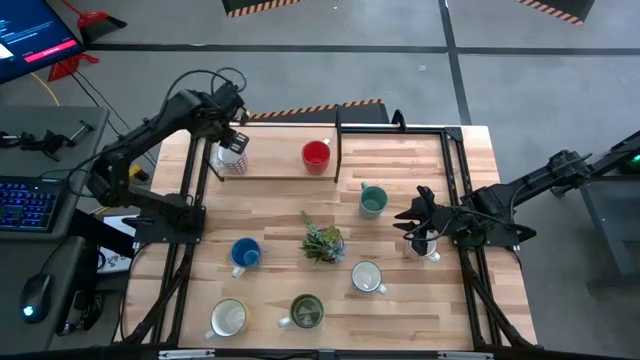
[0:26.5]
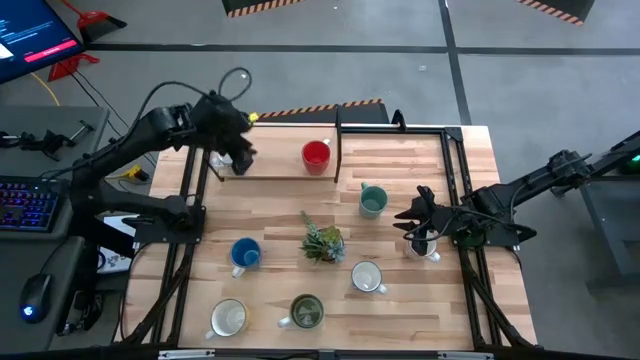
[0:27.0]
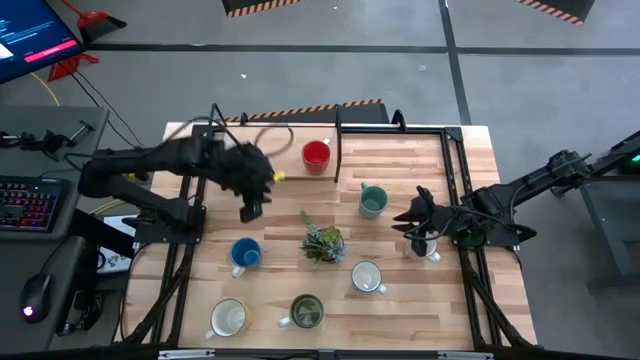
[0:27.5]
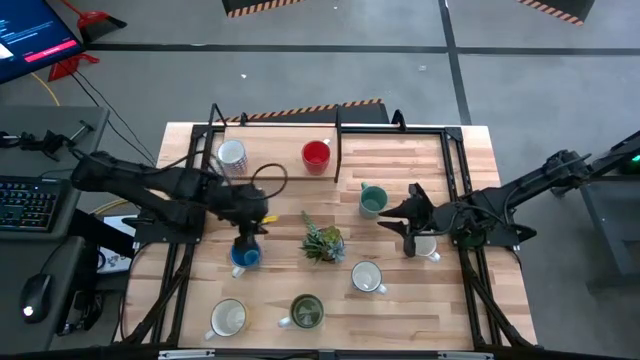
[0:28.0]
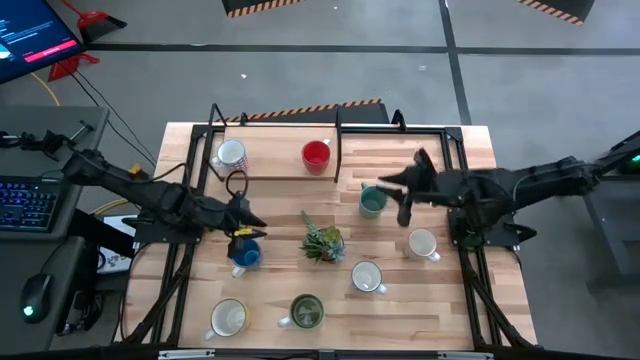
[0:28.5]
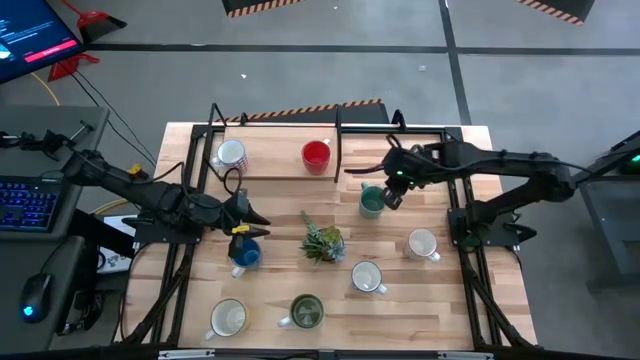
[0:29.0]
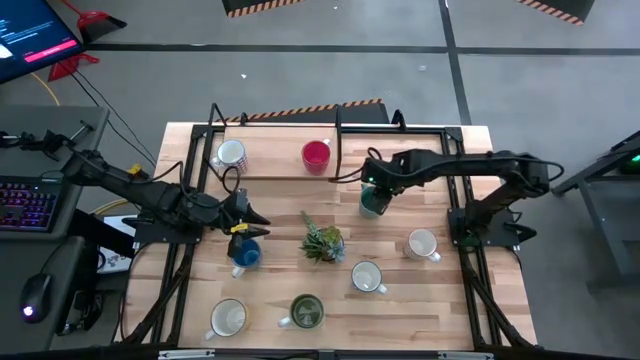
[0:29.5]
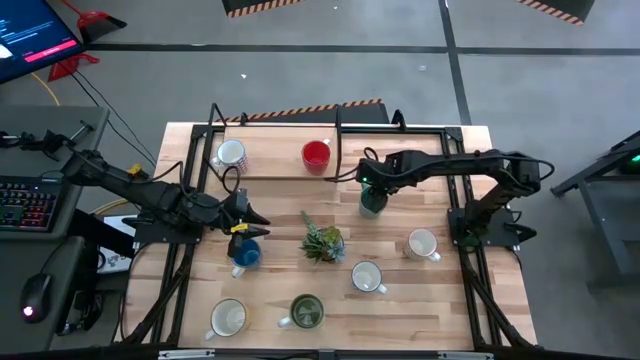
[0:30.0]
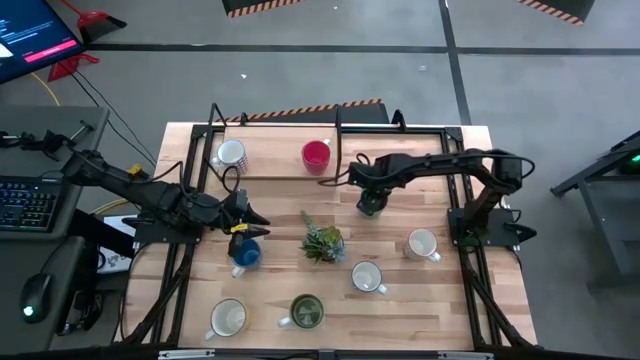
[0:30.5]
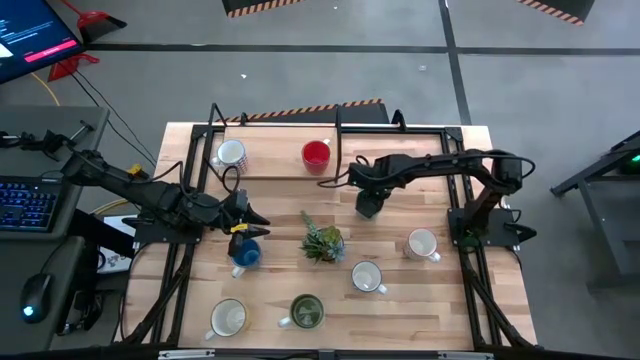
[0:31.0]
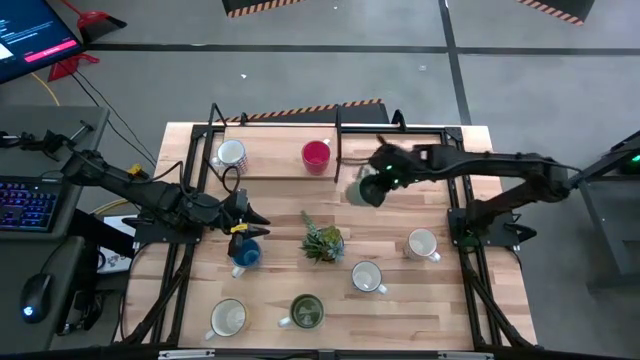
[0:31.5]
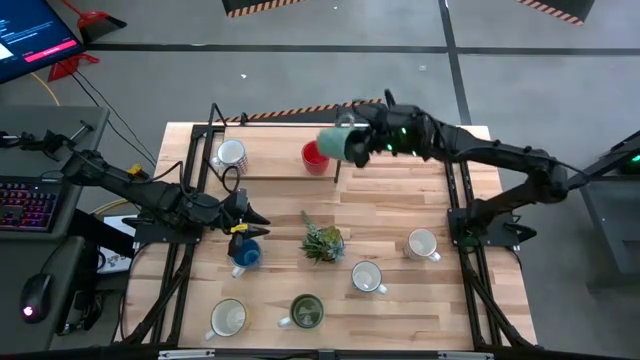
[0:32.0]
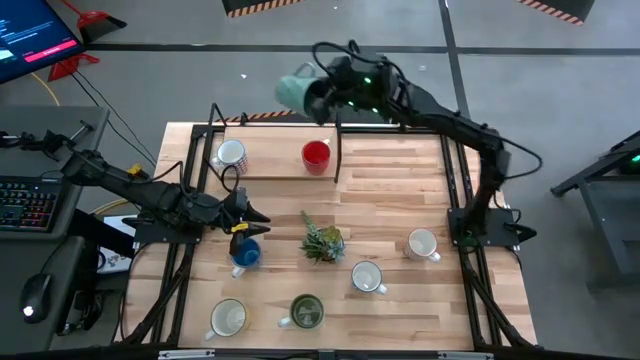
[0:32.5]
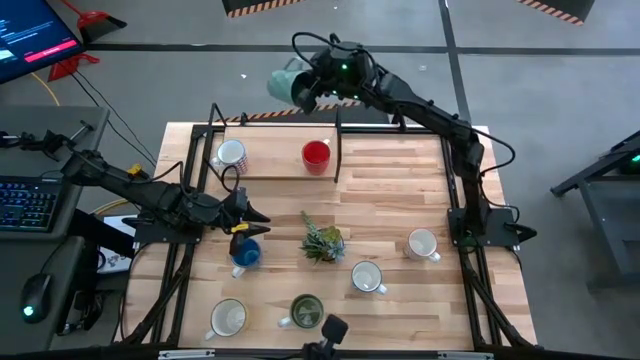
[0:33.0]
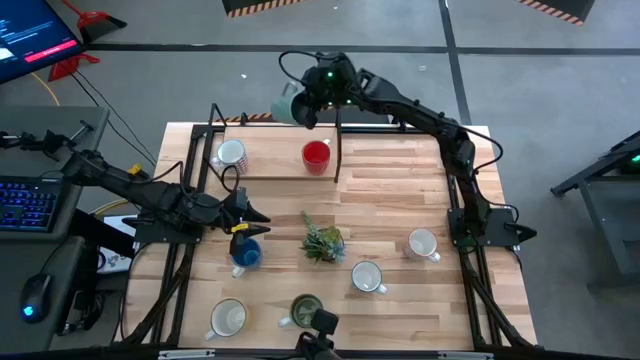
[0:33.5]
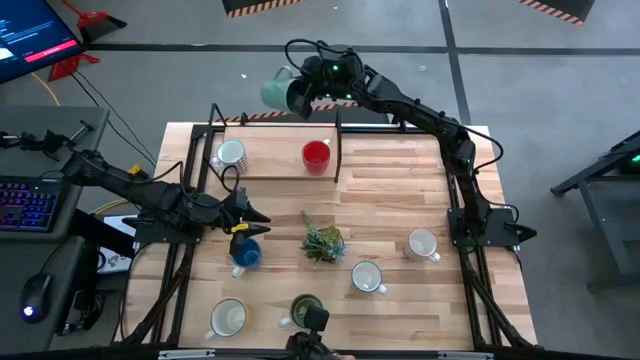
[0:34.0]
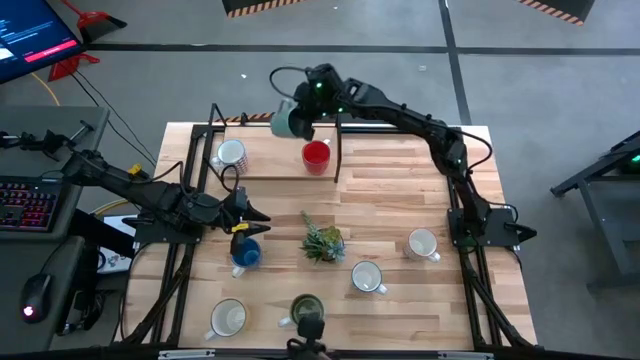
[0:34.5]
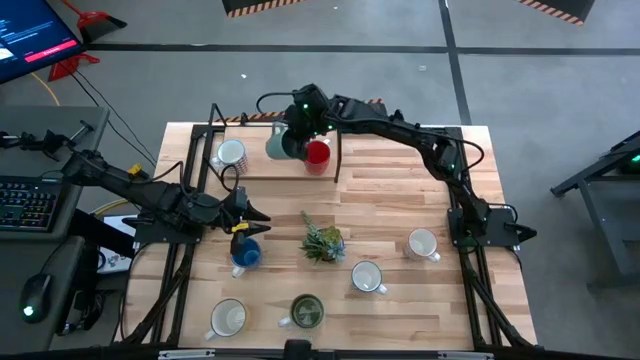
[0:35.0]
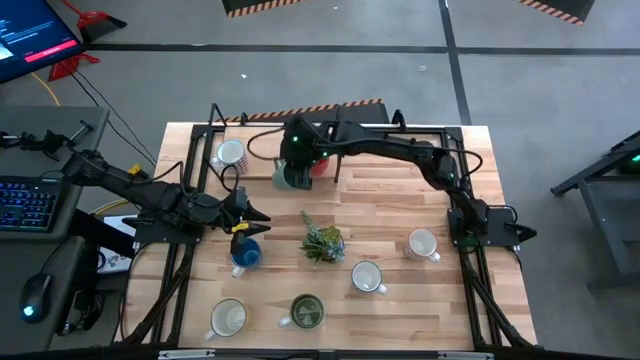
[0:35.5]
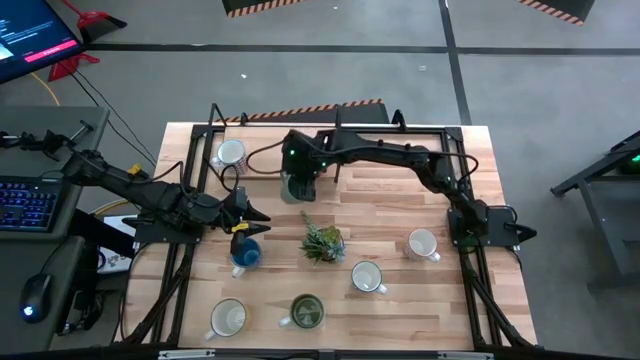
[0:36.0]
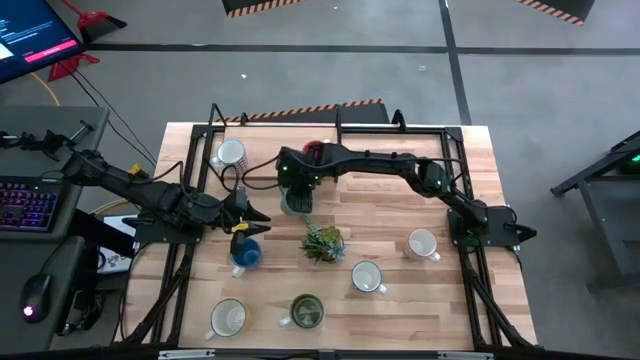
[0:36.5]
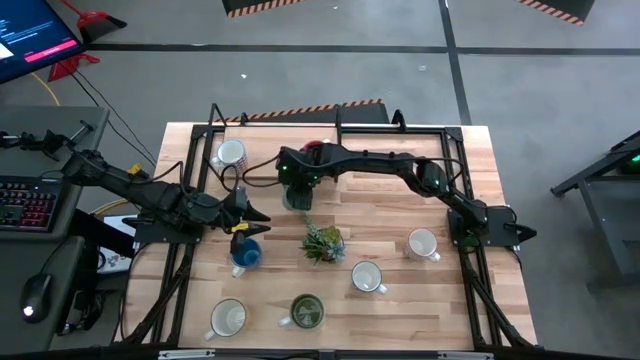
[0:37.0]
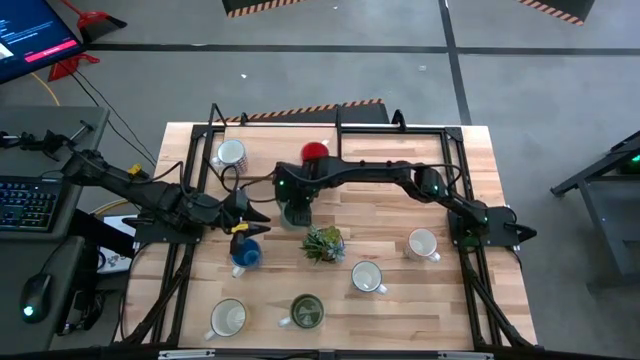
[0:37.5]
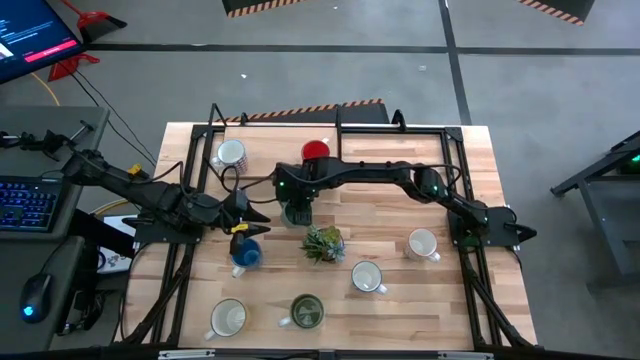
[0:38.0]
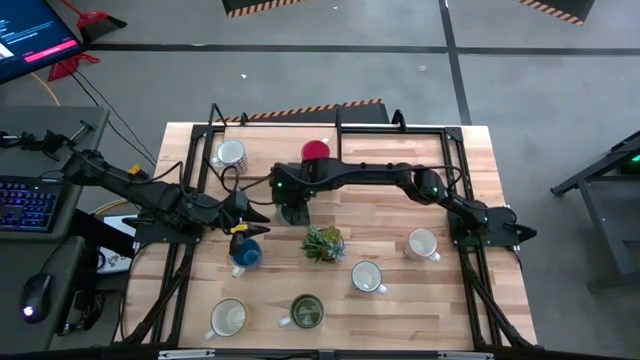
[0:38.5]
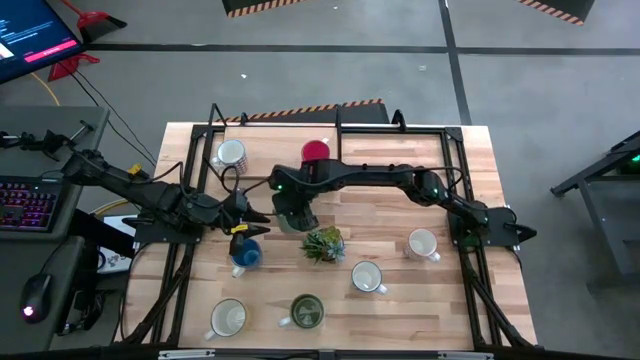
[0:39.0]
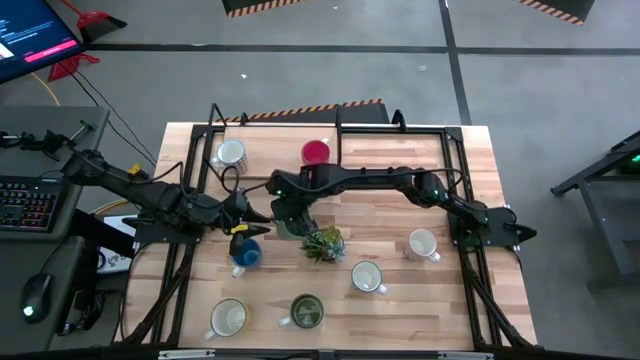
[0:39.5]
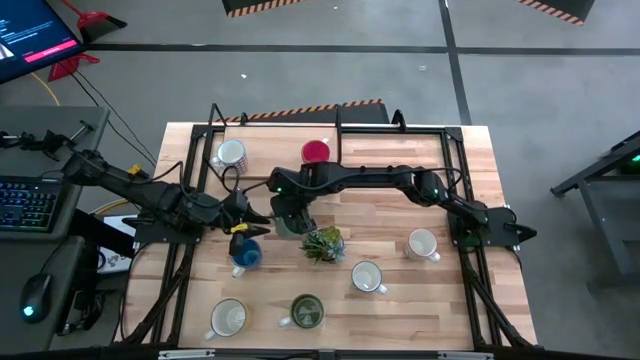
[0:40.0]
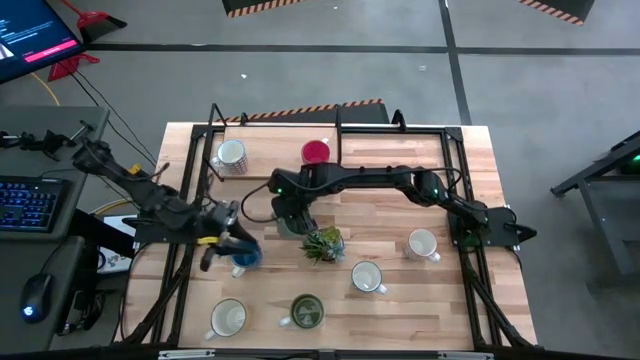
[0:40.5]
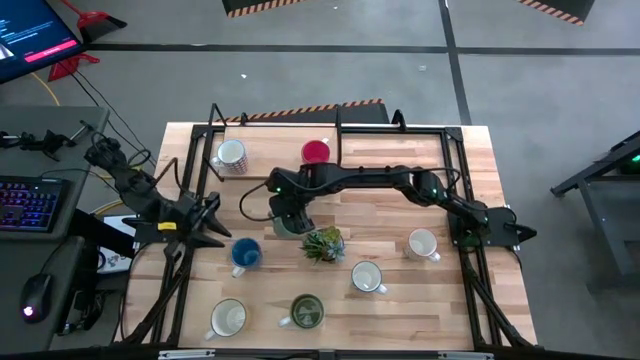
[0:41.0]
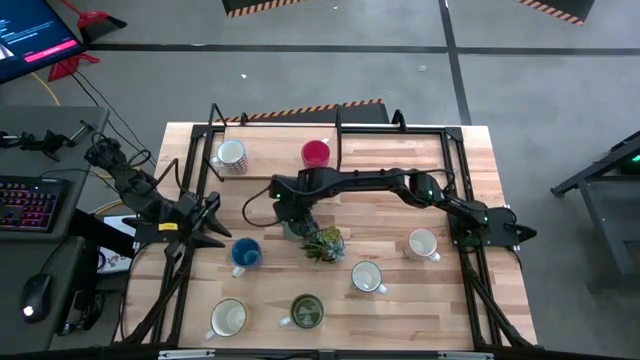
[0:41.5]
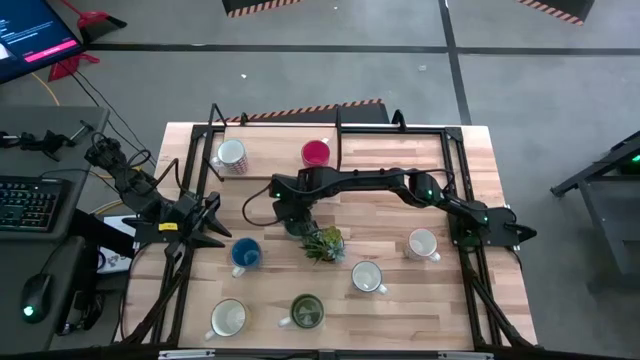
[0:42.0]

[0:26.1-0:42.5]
Task: Place coffee mugs
Move the light green mug on the center table

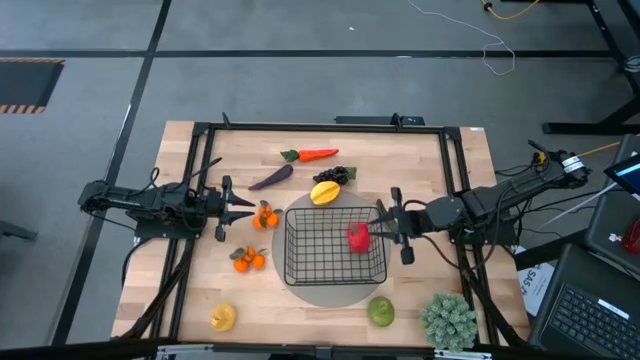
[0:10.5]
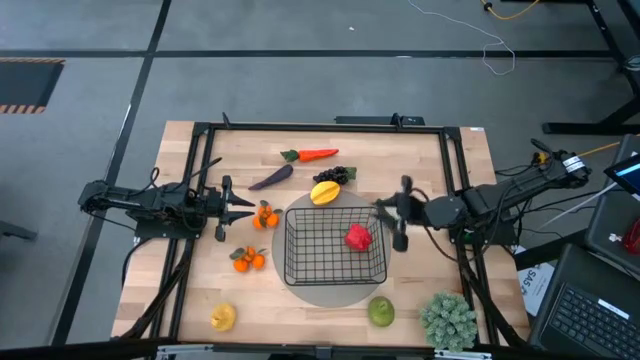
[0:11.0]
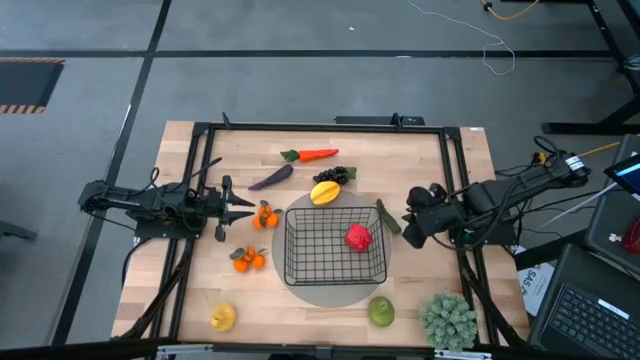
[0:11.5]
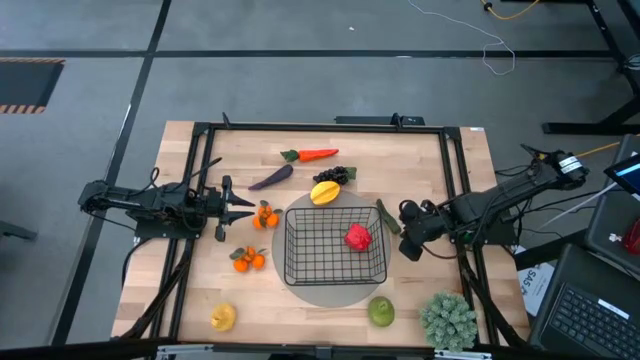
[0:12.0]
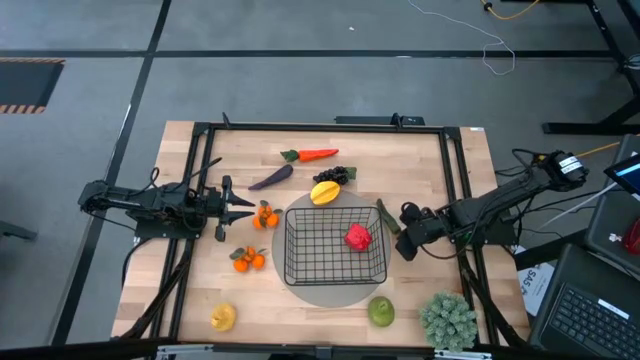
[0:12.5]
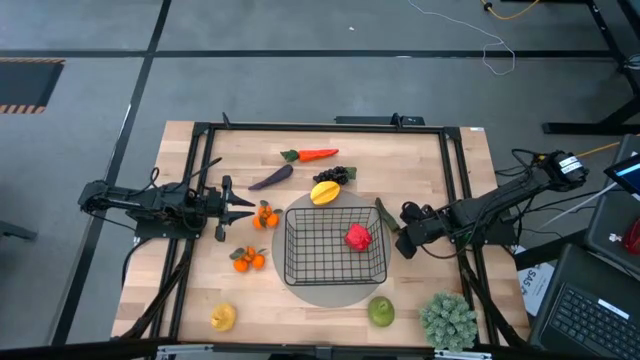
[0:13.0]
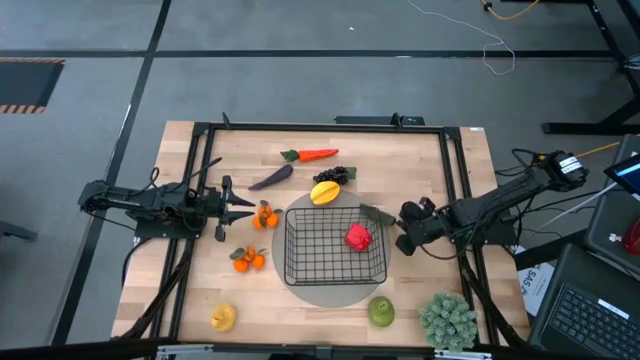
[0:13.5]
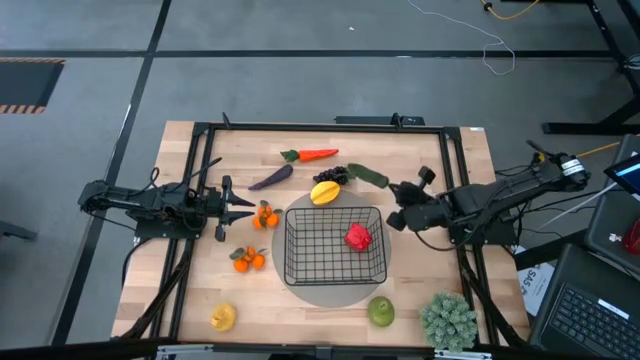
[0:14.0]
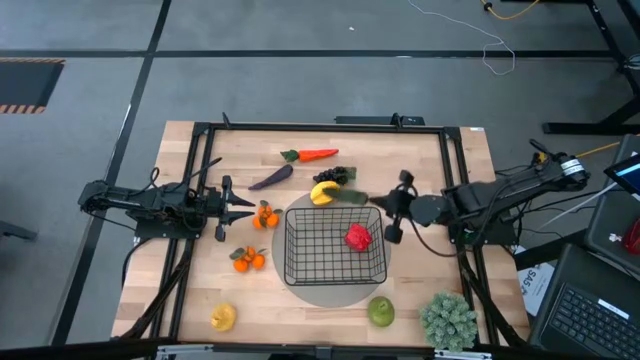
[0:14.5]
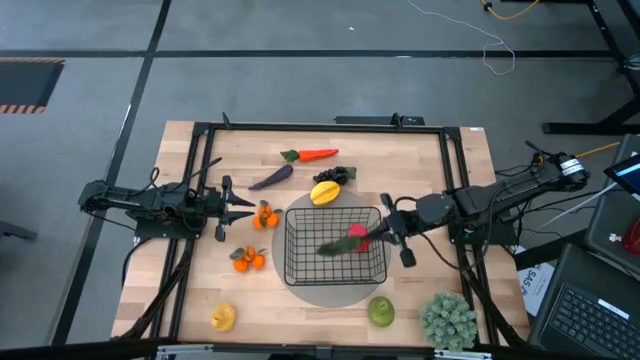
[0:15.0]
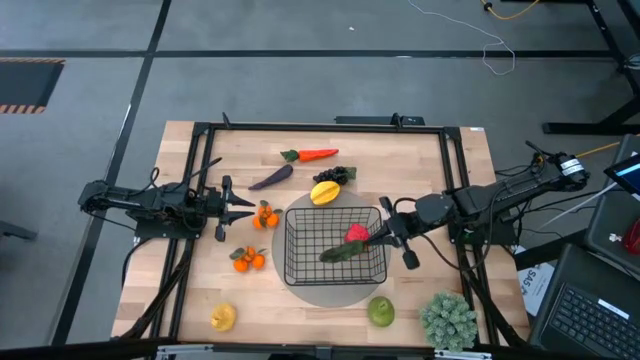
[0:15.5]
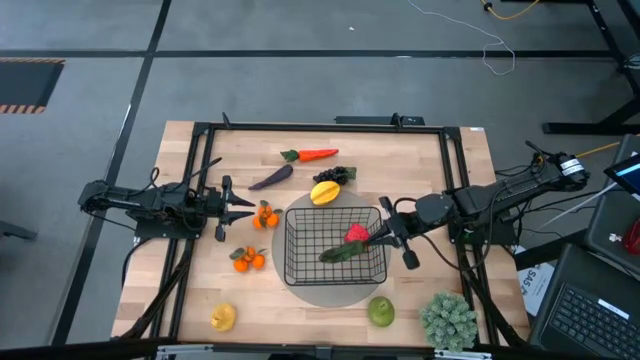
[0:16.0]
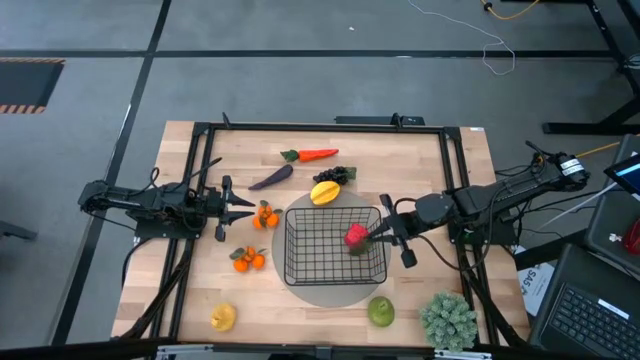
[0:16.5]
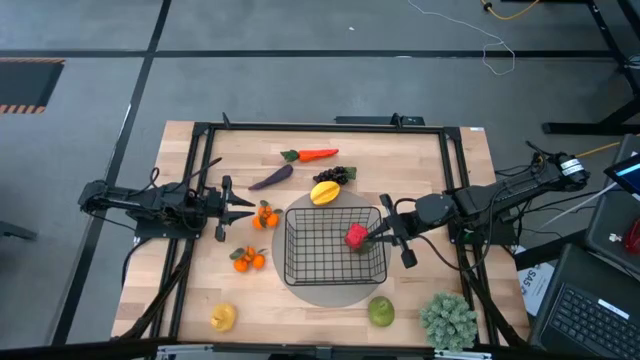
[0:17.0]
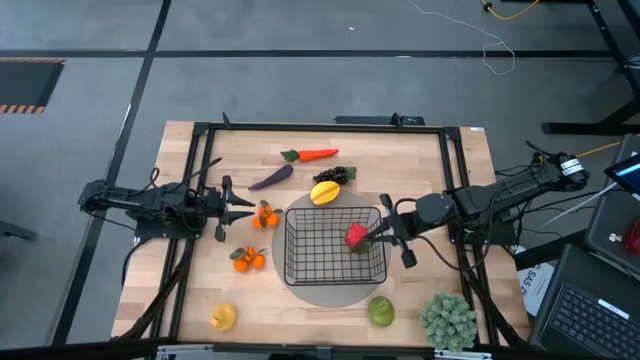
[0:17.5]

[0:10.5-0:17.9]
Task: Build produce basket
Put the green chili pepper into the black wire basket
